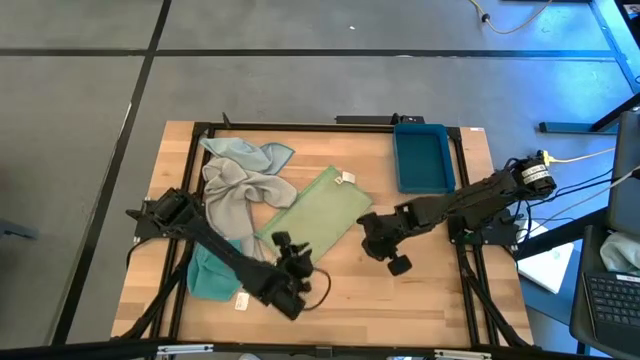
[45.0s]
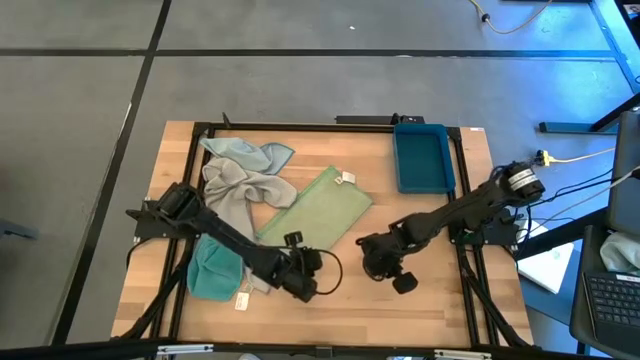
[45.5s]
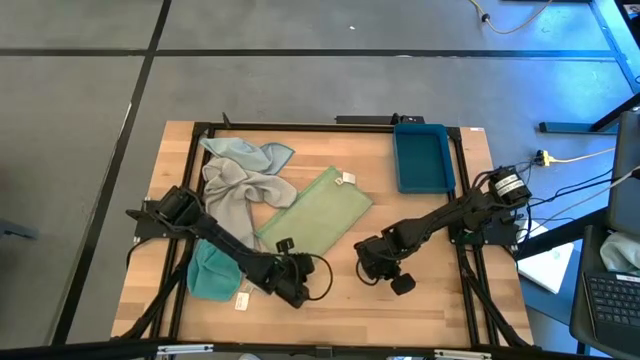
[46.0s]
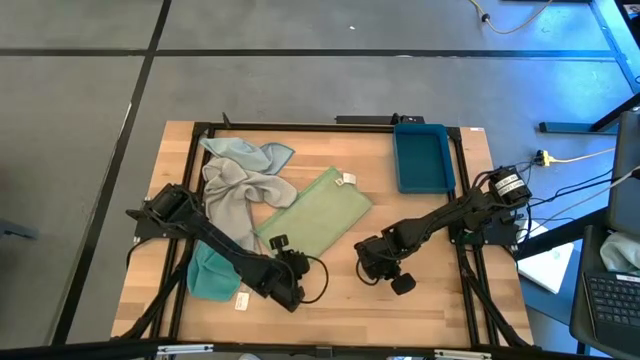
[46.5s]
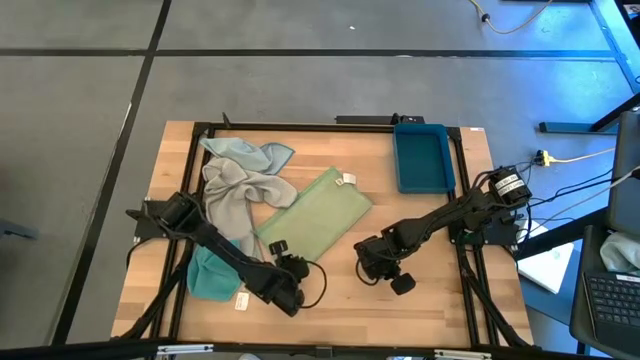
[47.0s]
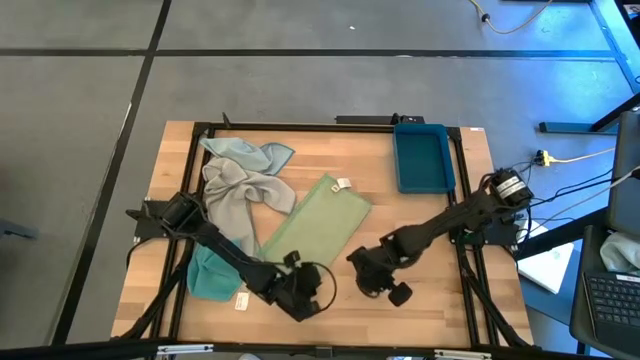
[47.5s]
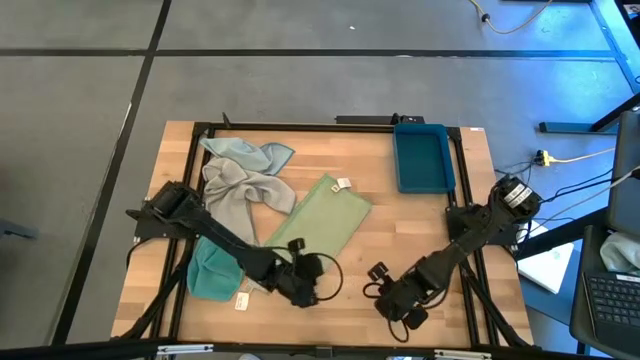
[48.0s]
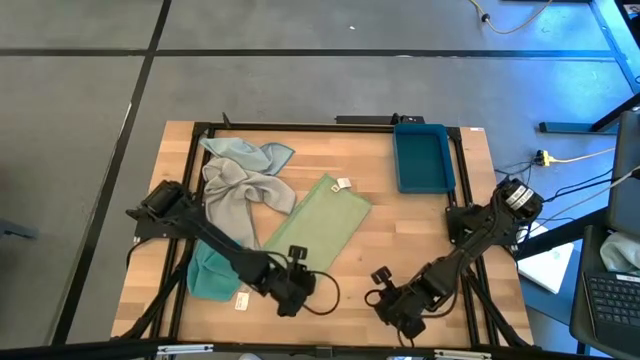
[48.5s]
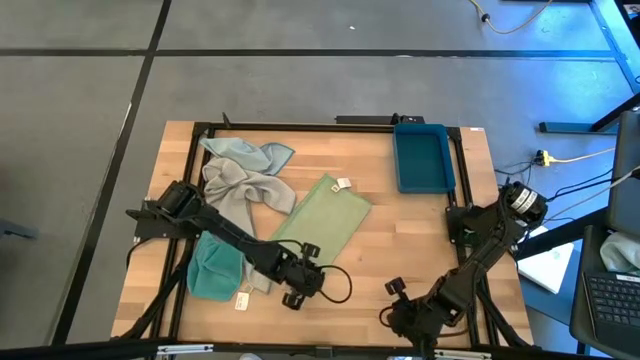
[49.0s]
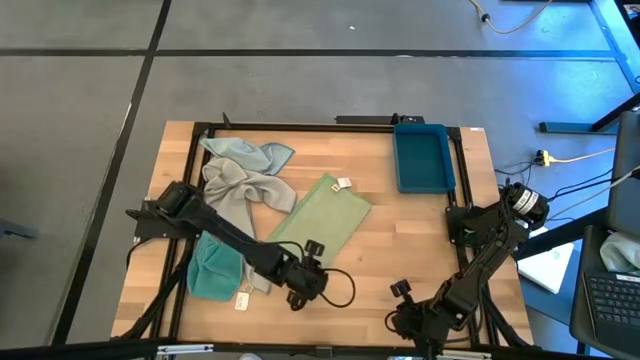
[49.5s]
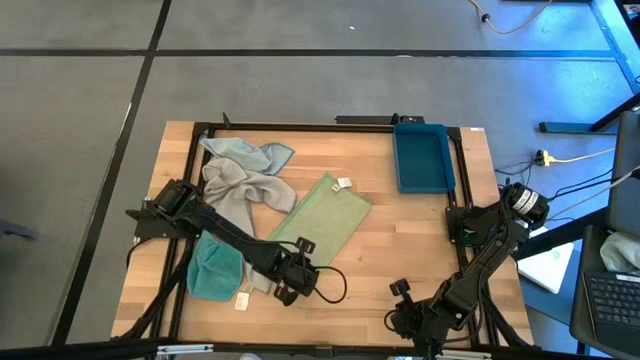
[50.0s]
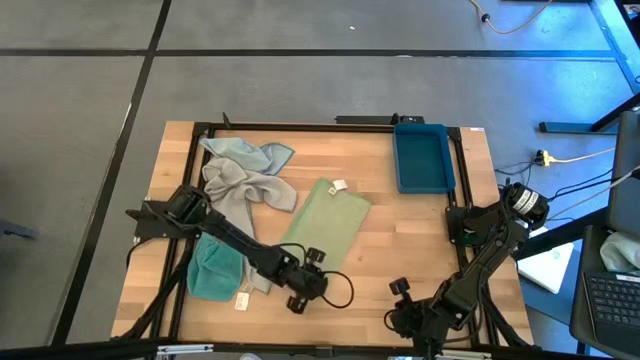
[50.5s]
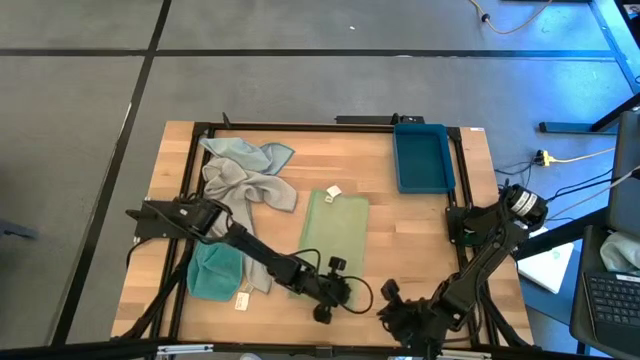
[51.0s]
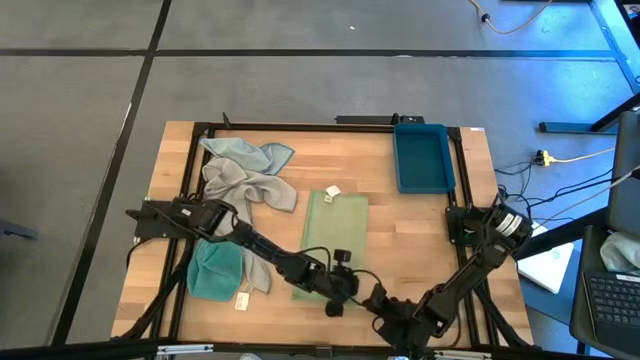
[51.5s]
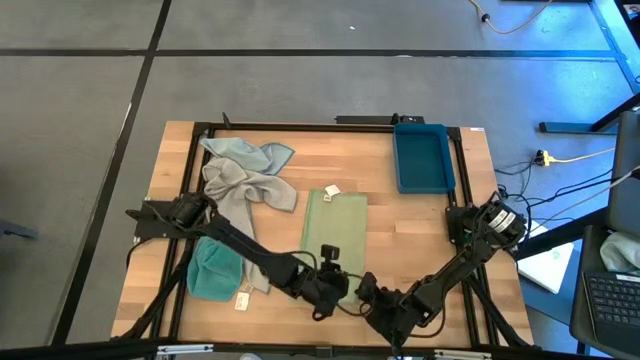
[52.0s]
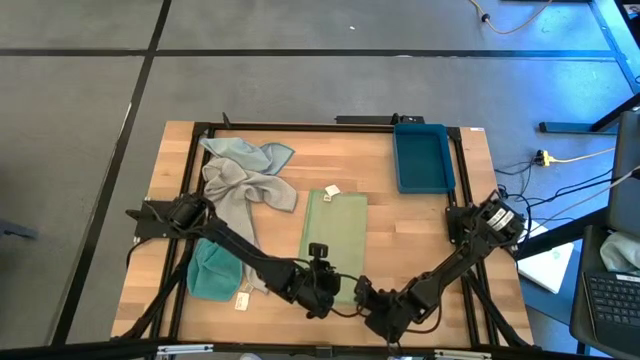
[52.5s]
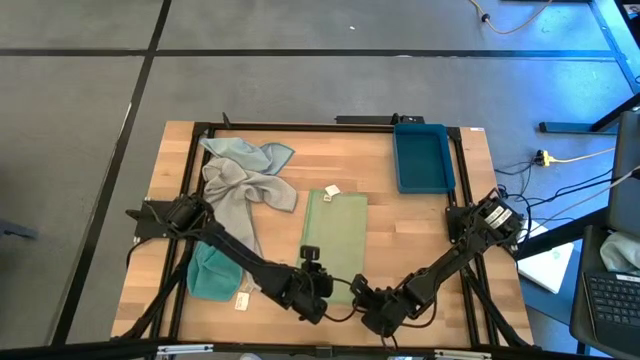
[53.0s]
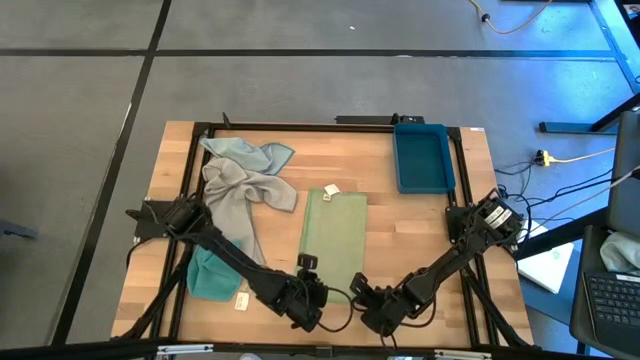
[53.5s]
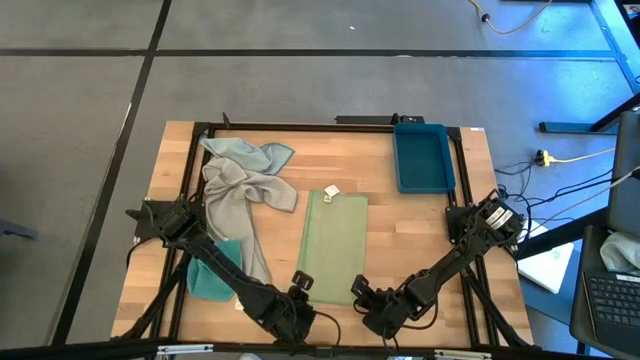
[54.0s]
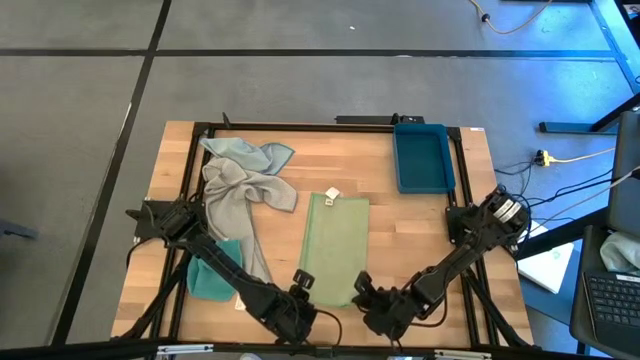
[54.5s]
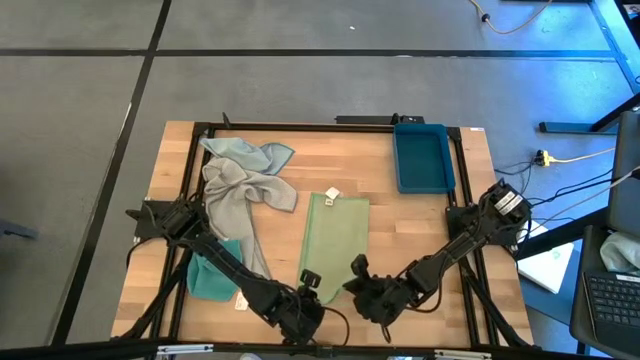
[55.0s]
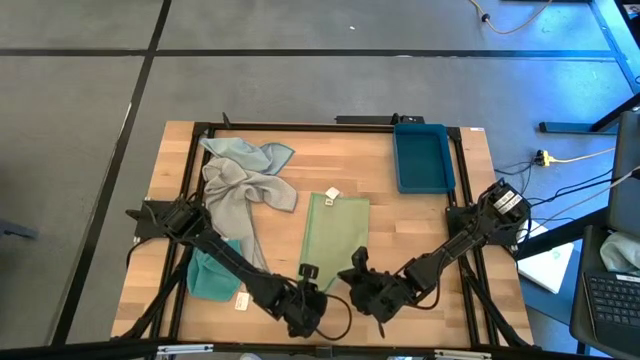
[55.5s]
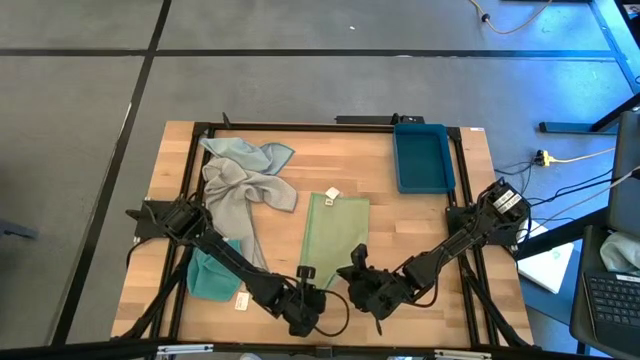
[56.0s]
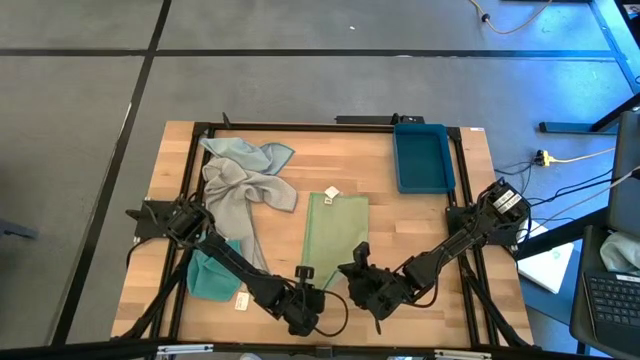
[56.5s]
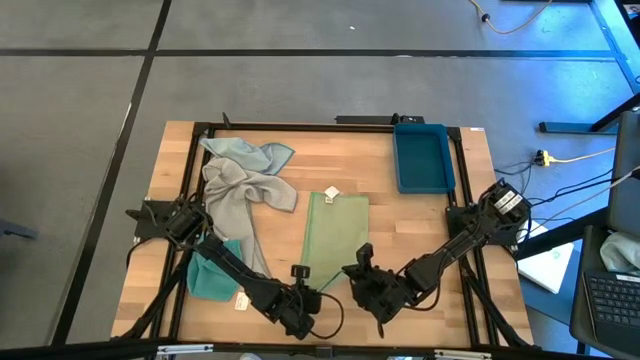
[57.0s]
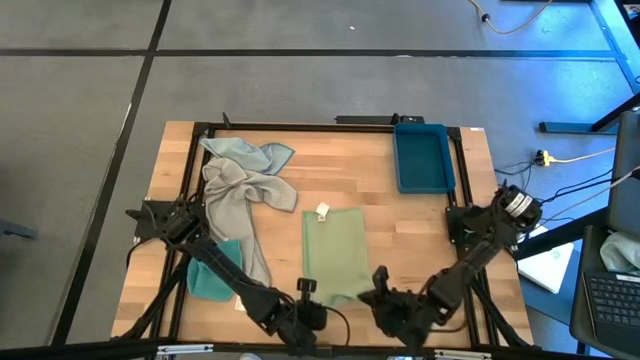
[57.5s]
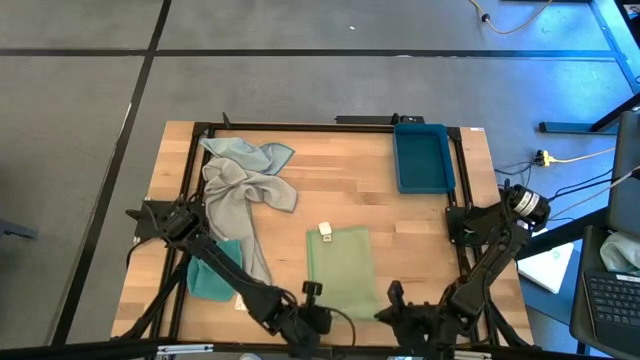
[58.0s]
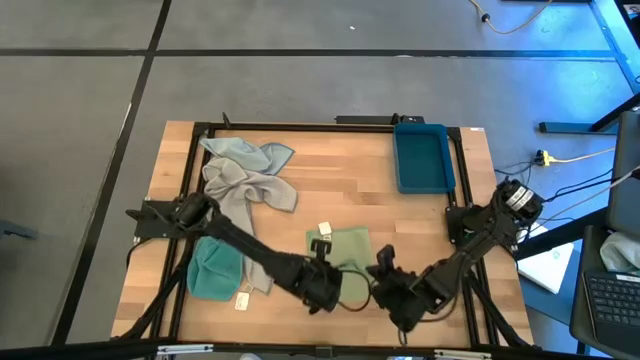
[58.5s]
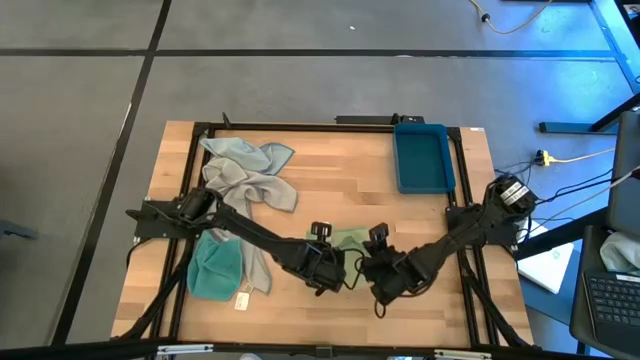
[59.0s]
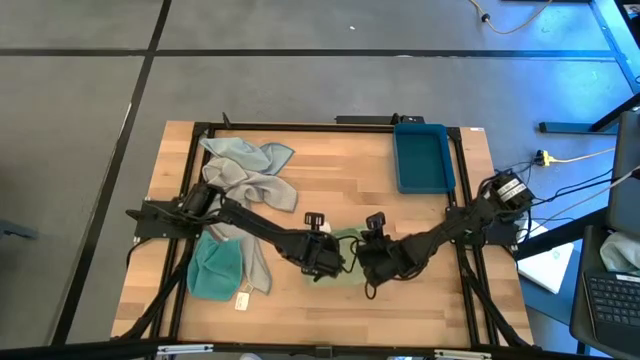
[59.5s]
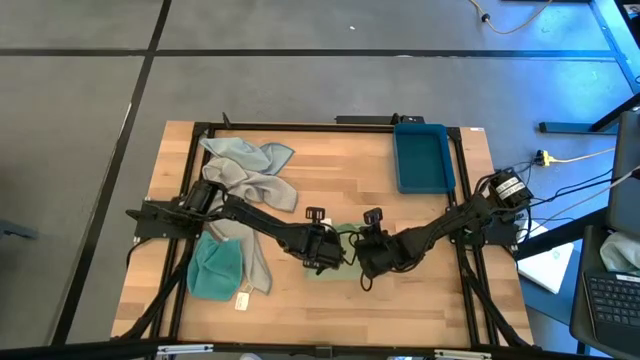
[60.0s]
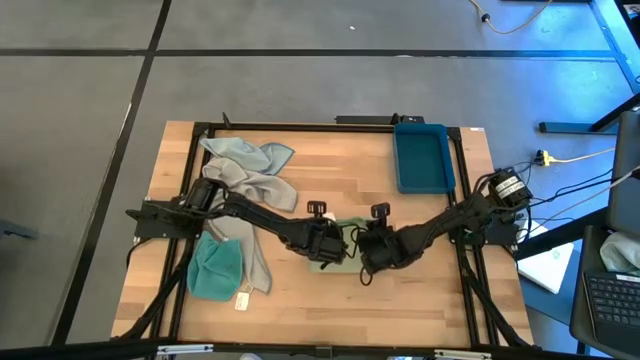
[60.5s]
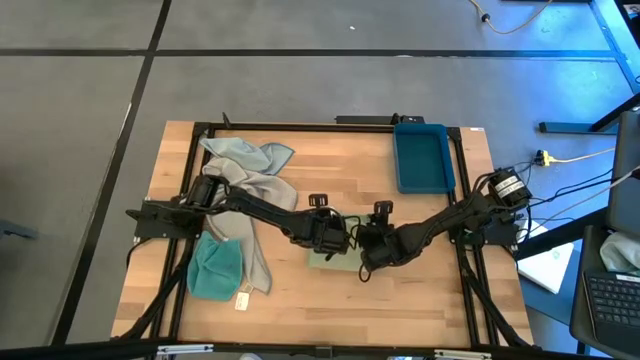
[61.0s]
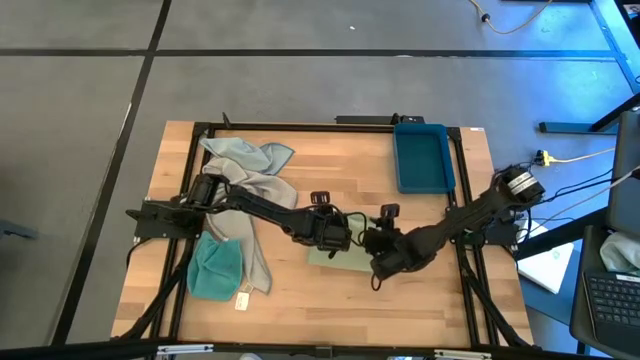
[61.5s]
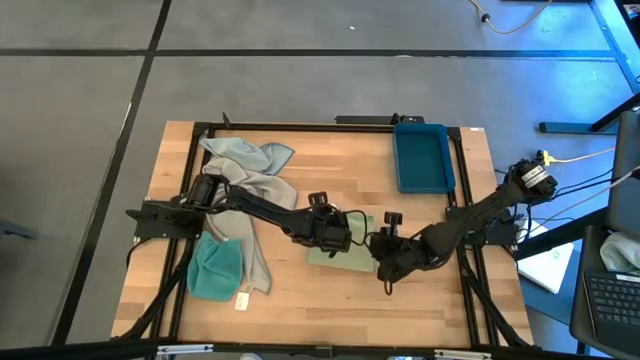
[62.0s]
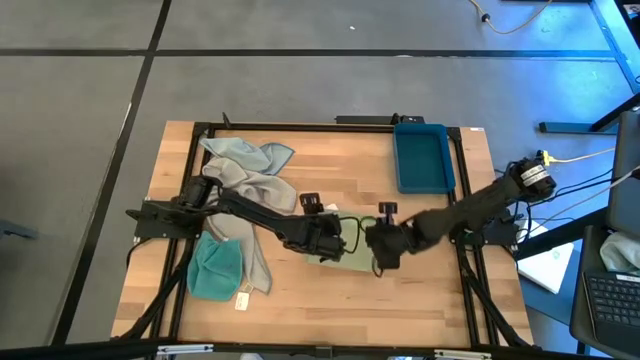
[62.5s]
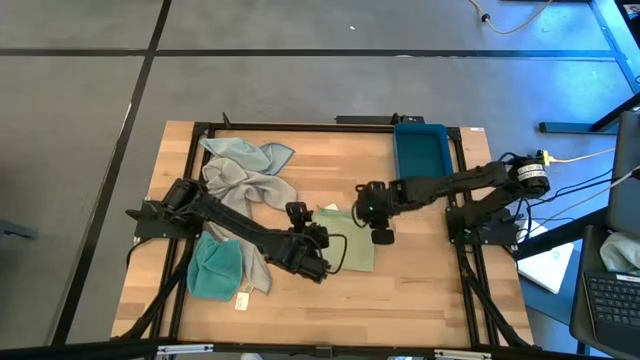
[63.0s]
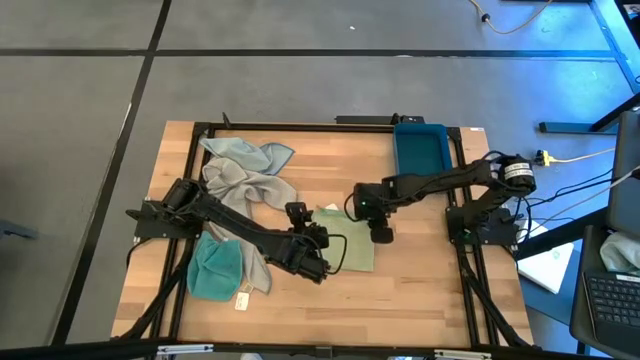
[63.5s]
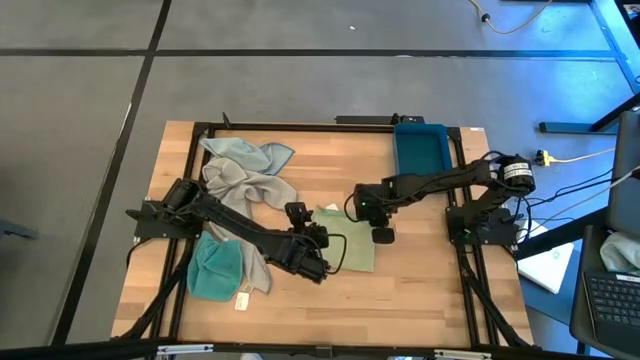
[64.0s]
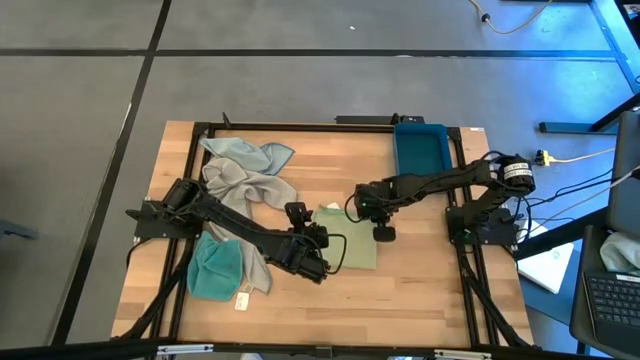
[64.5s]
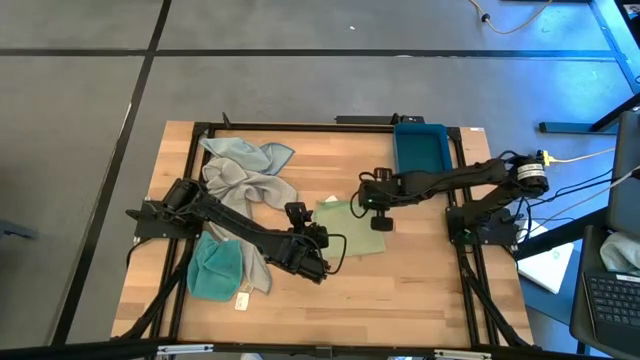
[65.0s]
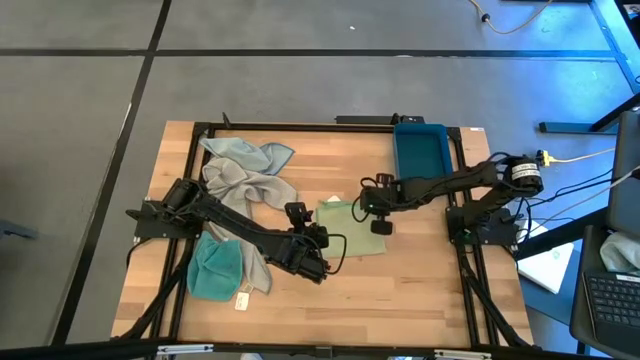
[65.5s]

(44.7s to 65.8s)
Task: Fold microfiber towels
Fold the green microfiber cloth
